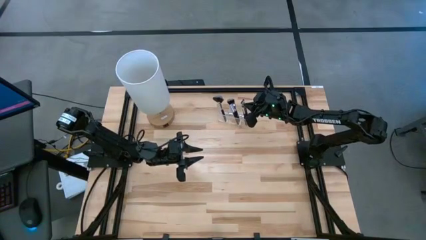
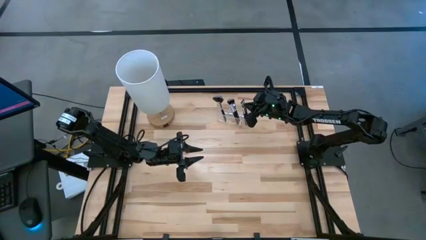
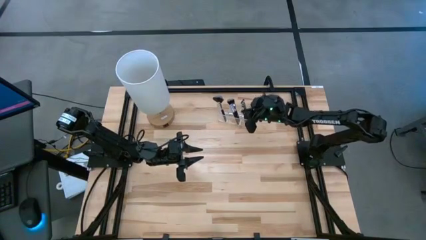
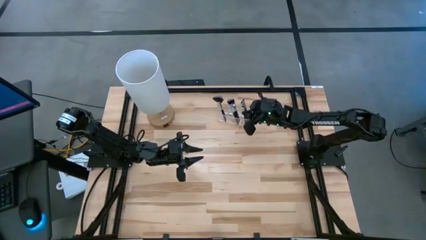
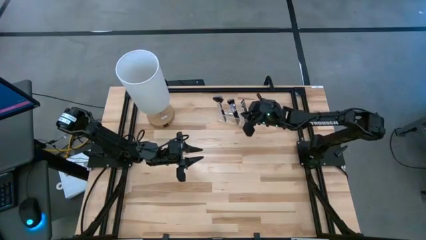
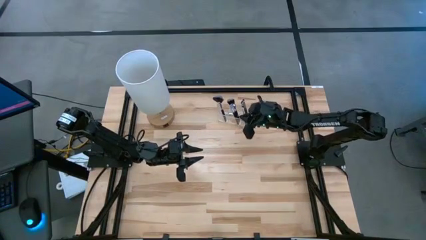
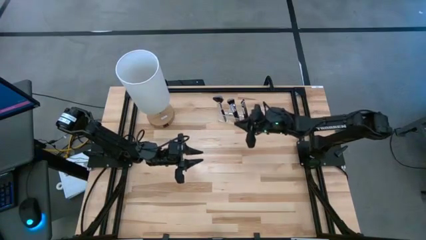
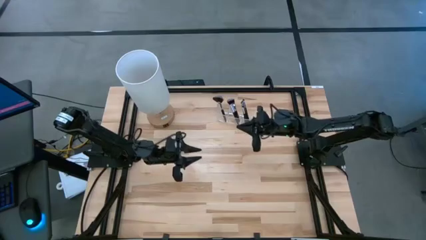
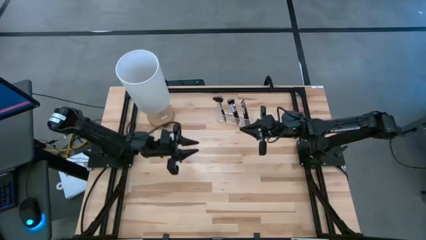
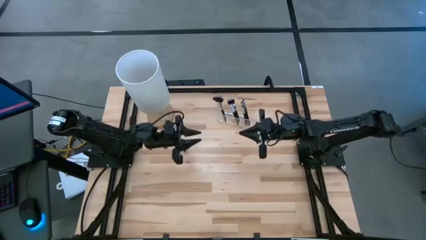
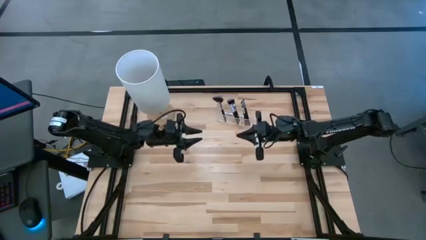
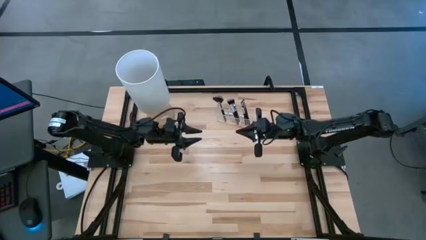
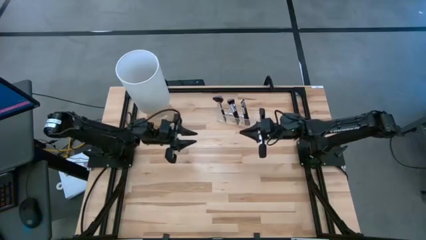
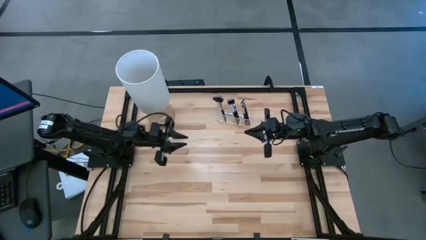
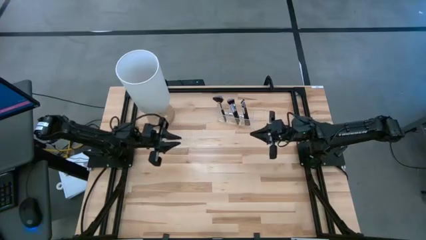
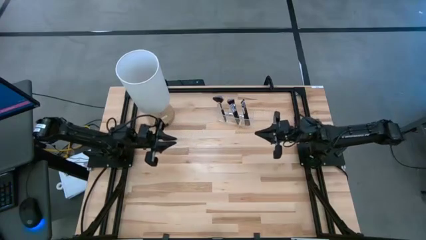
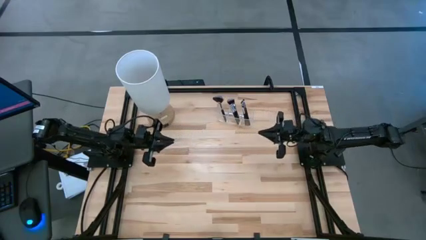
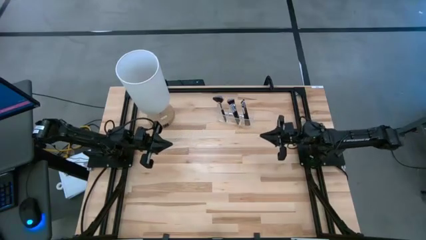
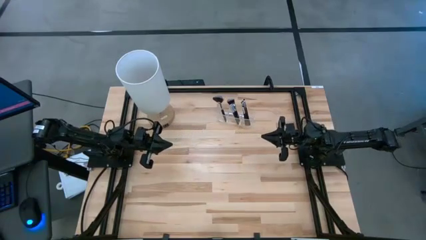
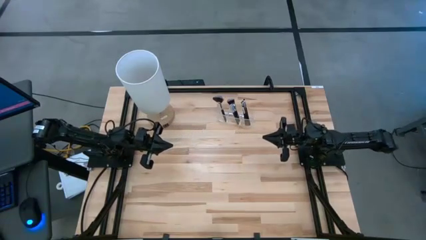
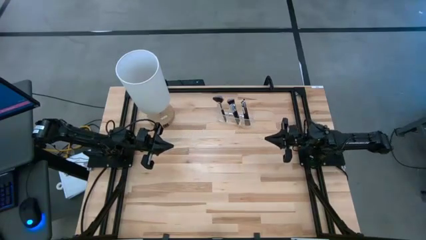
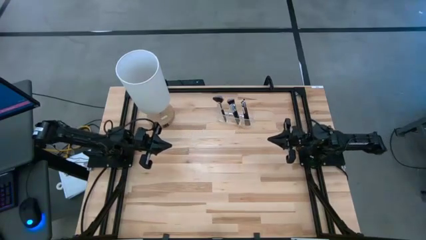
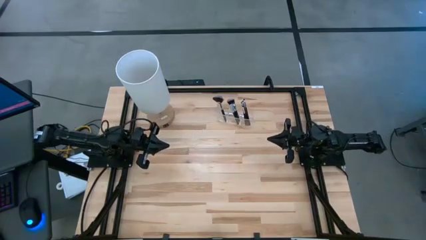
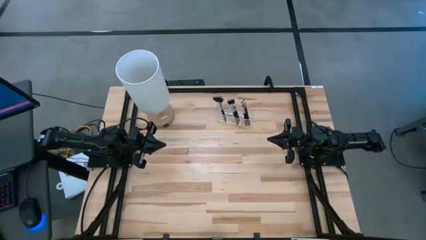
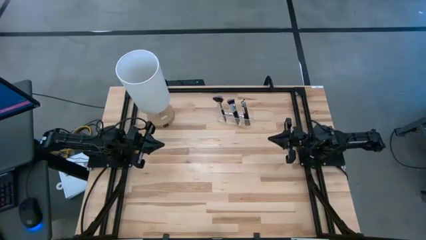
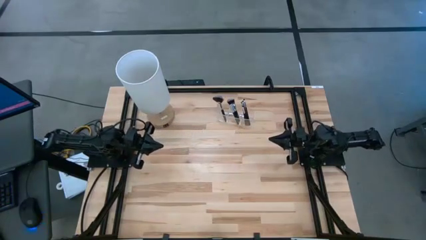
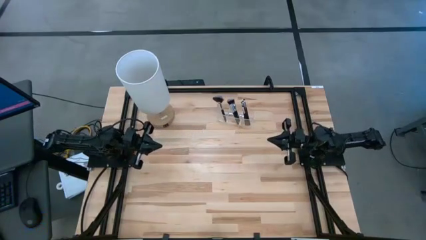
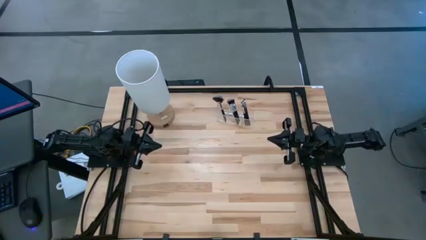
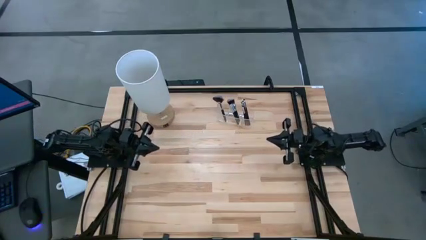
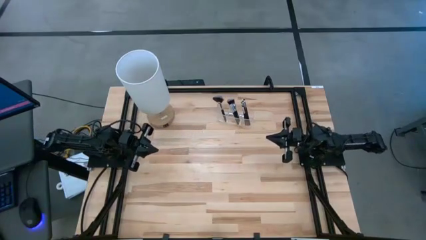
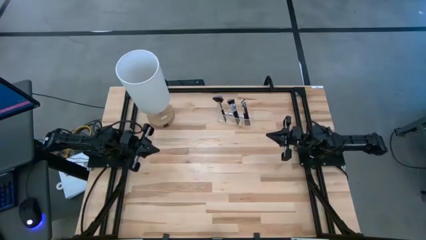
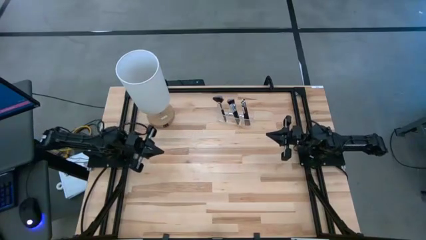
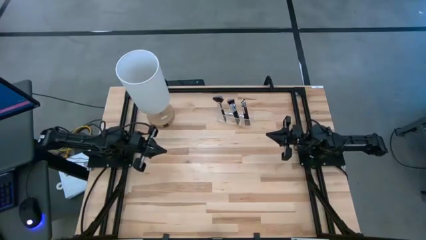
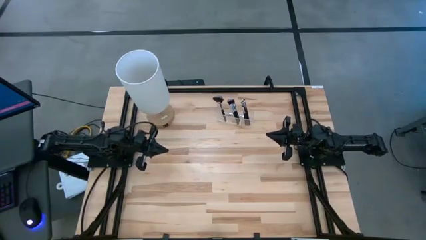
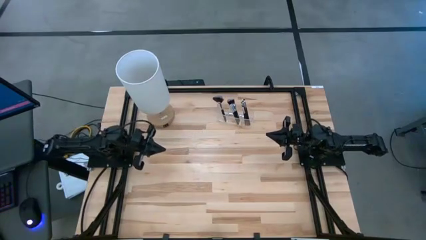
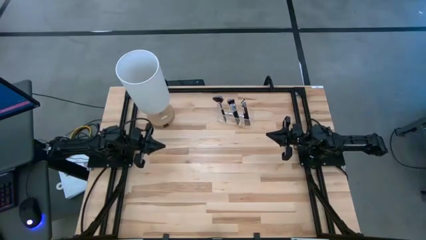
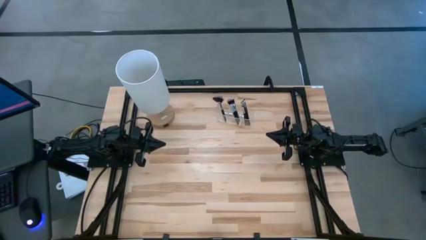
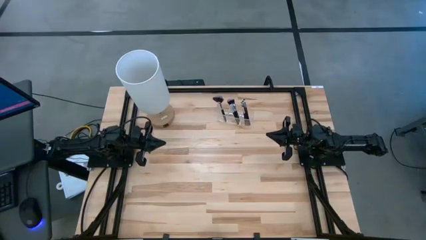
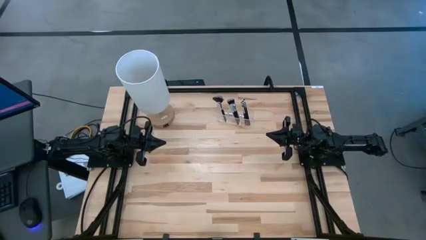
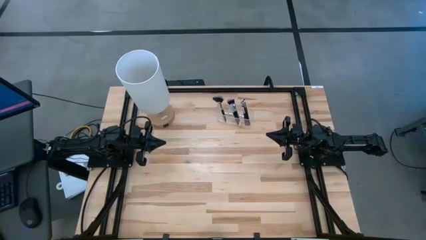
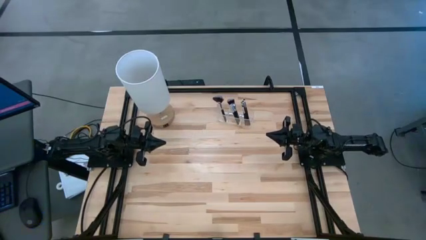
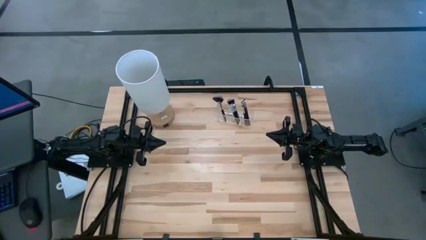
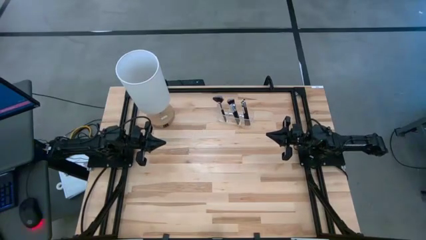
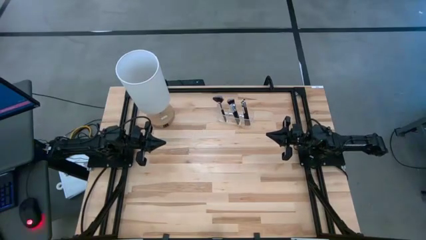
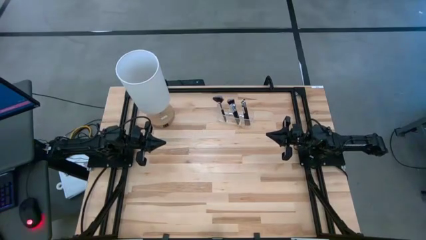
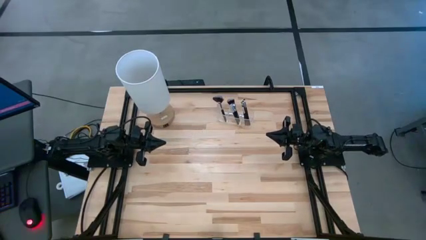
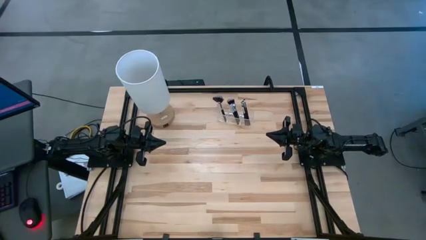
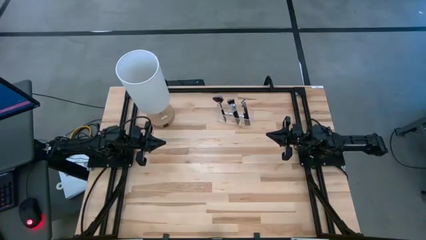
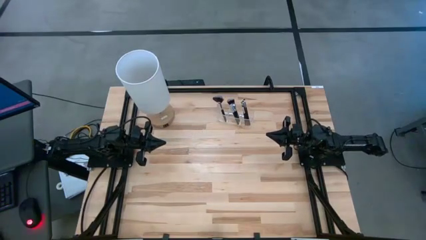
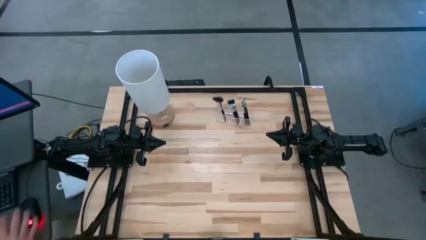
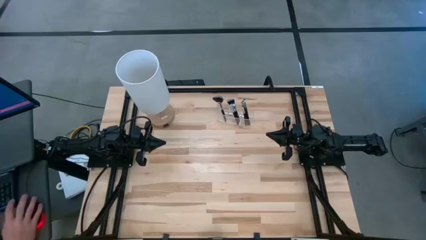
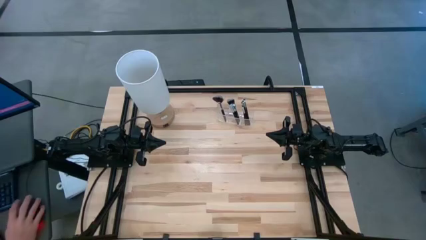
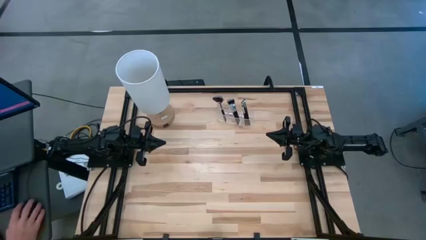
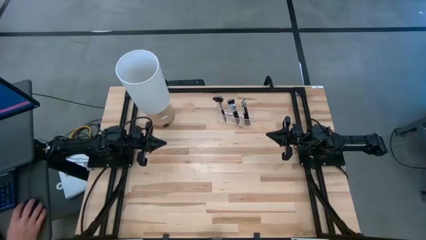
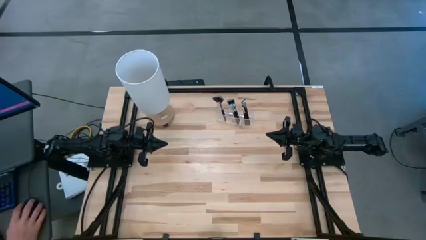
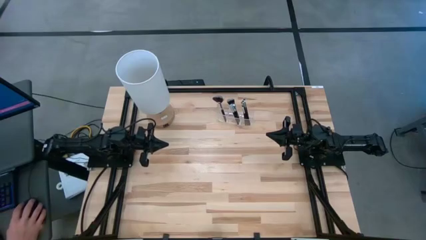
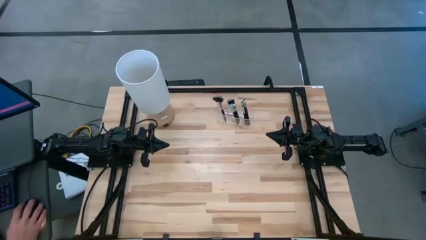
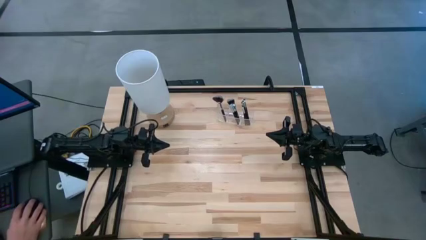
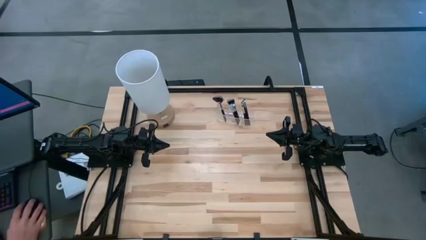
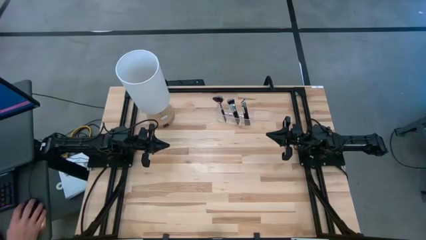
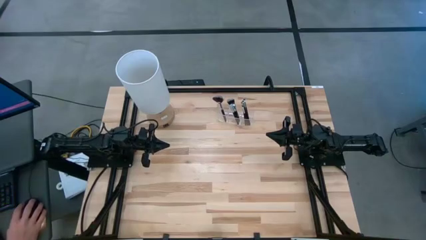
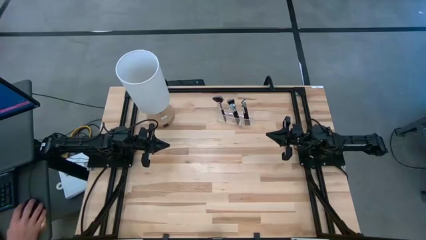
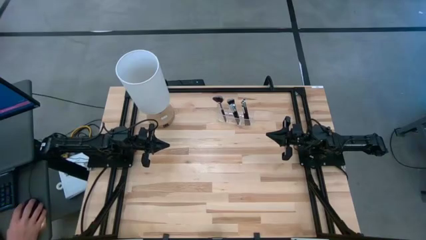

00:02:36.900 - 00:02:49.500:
Task: Put items in baskets/containers
Return to Home Position

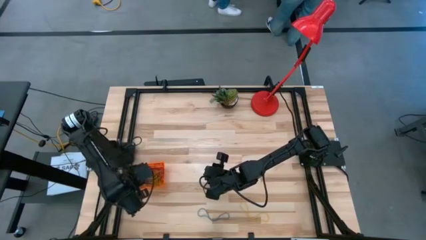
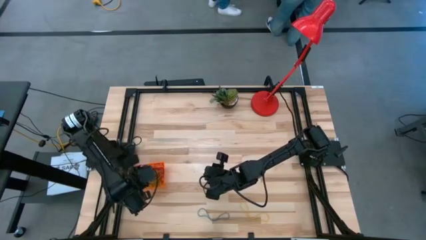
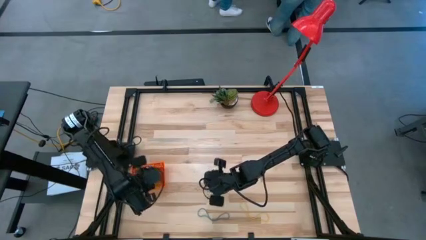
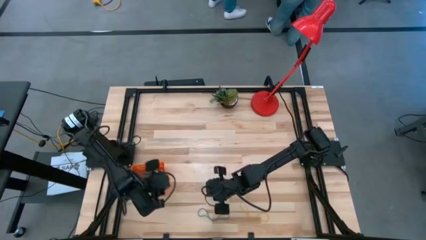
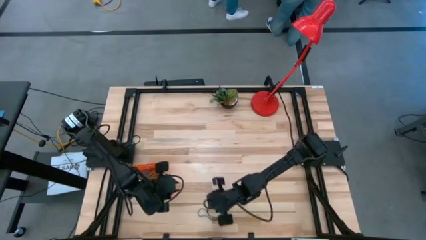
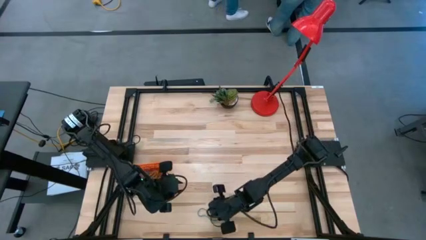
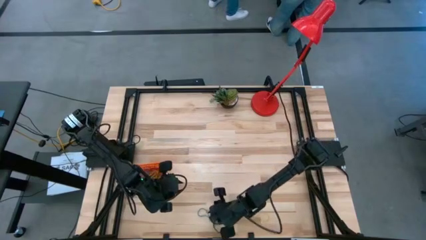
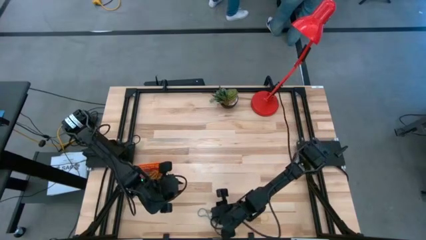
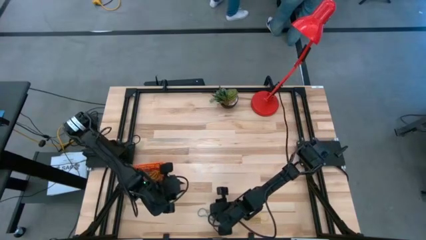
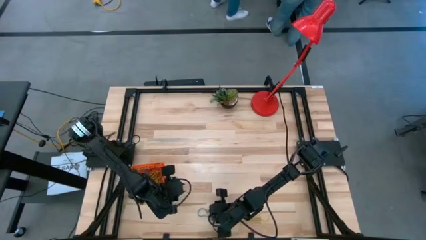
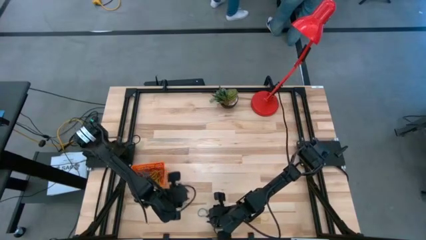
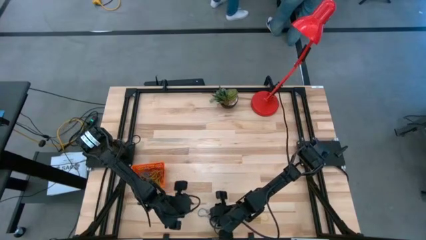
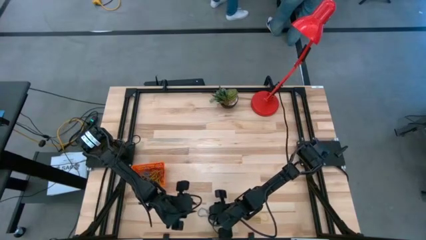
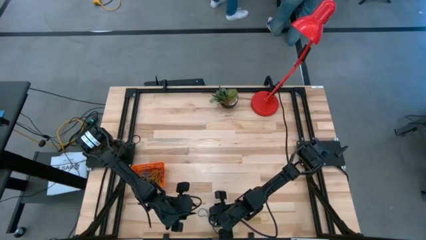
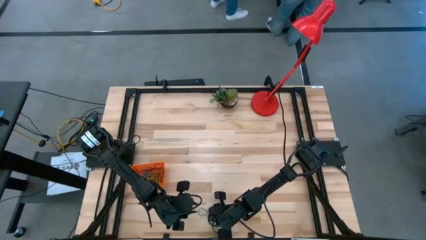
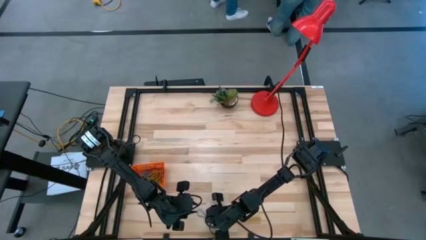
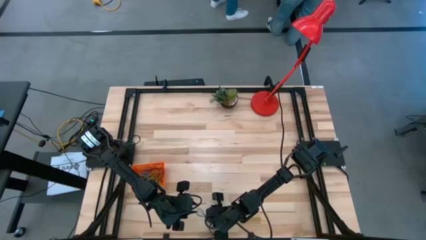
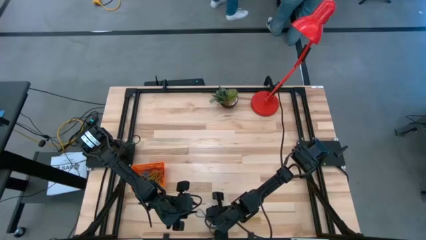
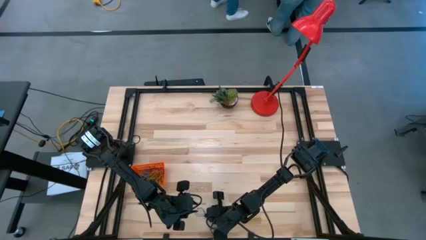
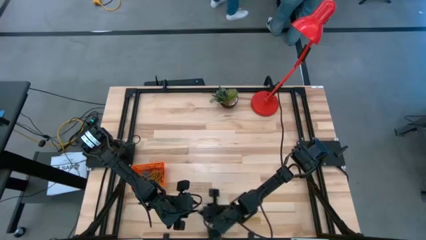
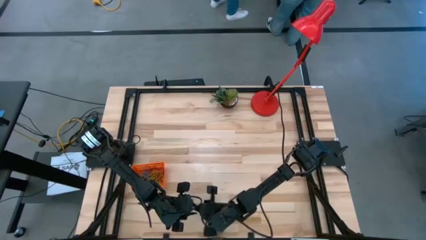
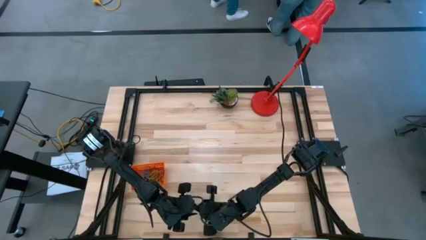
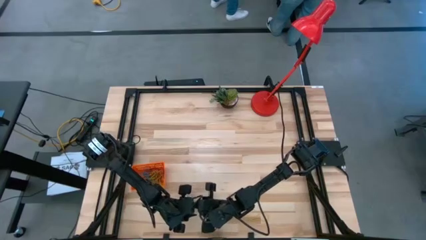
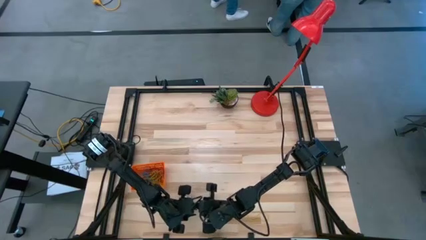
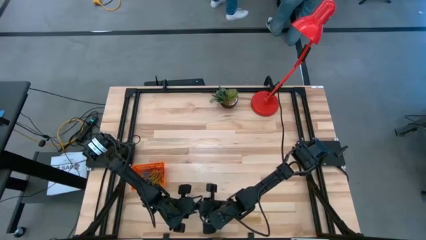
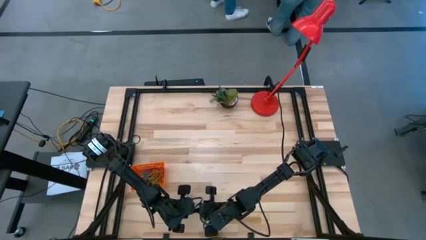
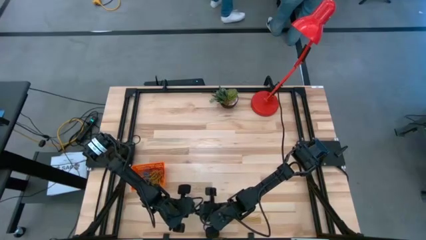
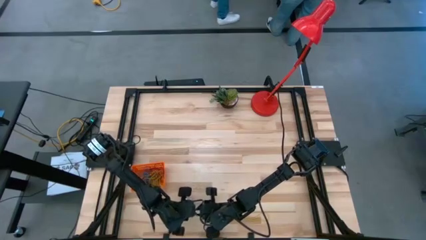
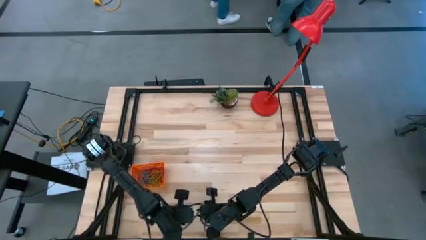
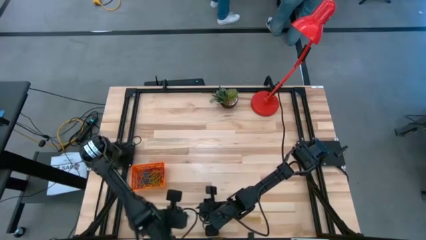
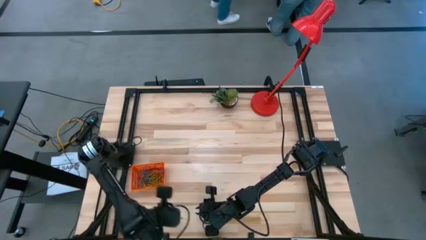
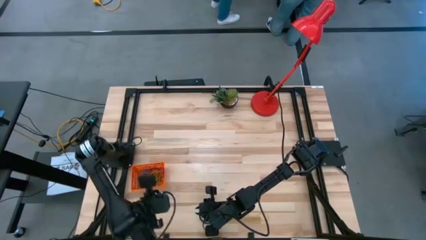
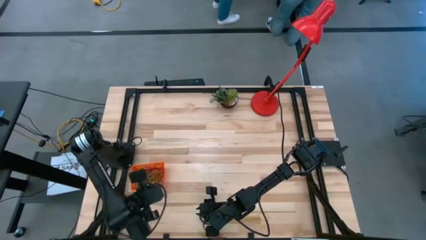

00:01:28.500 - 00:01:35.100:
Task: Pick and place rubber bands into bin
Put the blue rubber band into the orange basket
